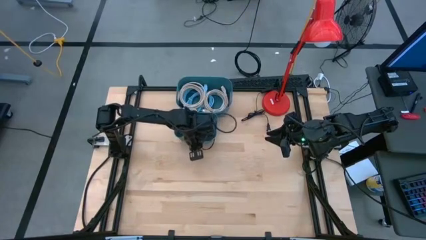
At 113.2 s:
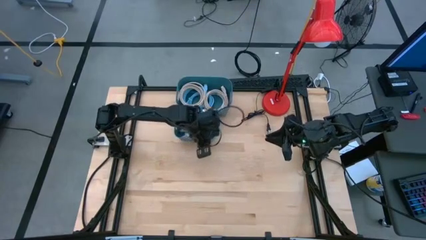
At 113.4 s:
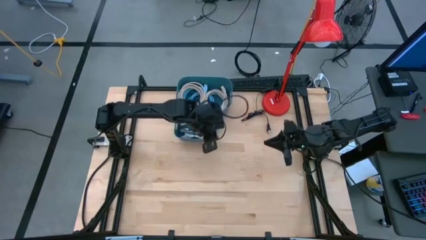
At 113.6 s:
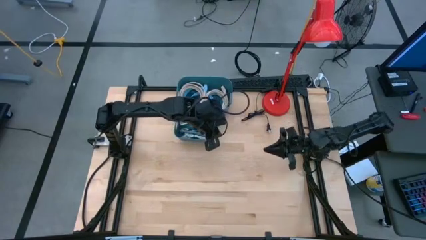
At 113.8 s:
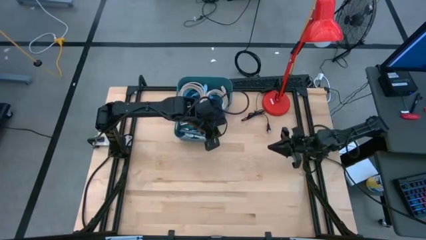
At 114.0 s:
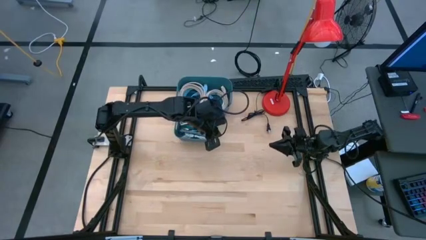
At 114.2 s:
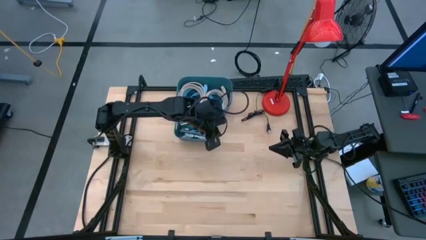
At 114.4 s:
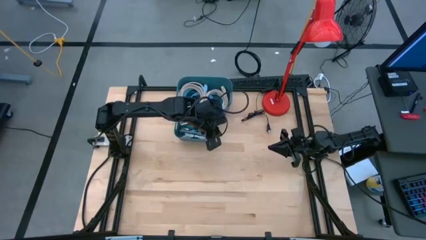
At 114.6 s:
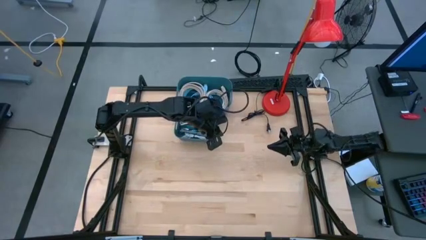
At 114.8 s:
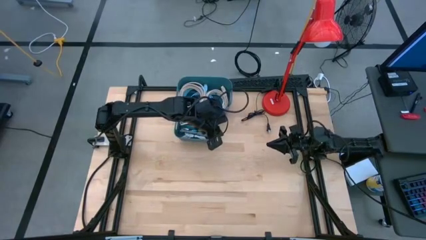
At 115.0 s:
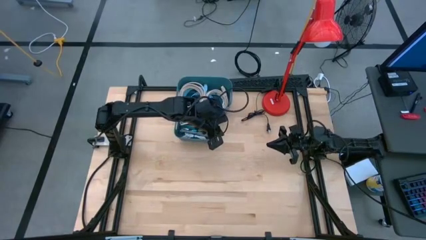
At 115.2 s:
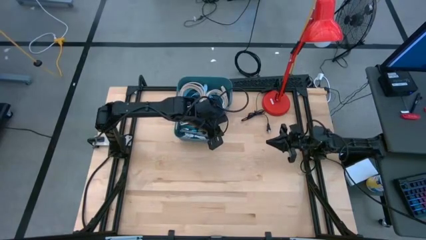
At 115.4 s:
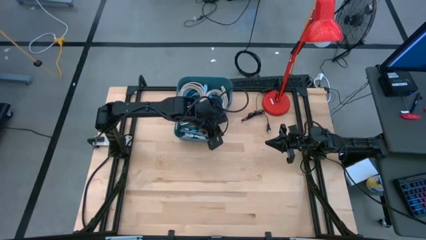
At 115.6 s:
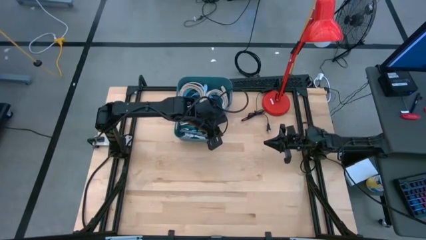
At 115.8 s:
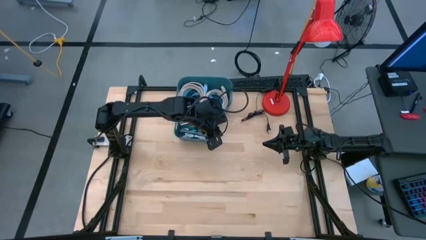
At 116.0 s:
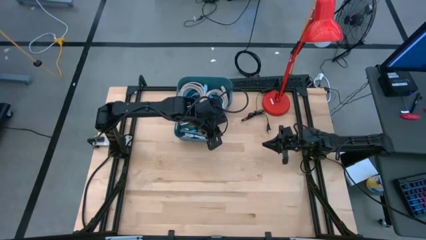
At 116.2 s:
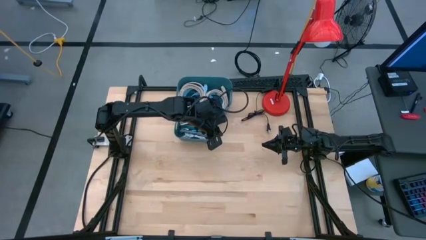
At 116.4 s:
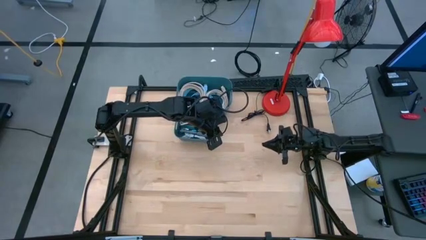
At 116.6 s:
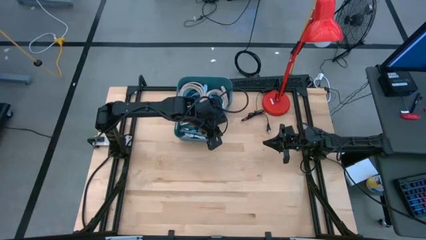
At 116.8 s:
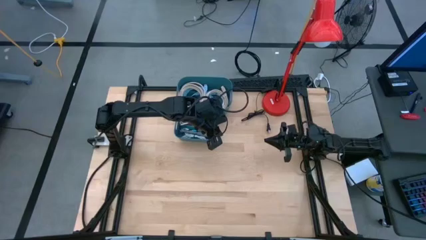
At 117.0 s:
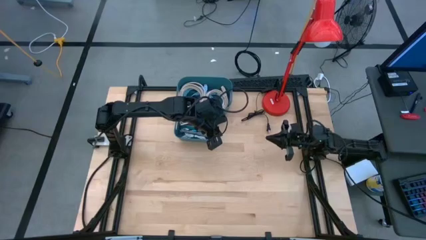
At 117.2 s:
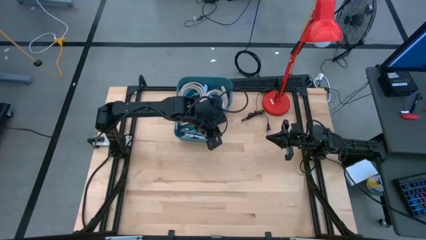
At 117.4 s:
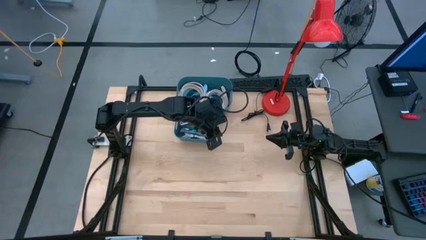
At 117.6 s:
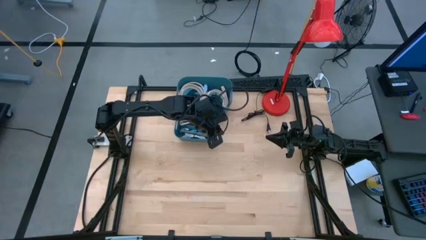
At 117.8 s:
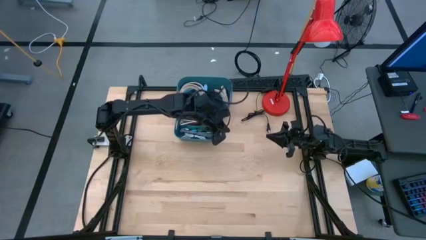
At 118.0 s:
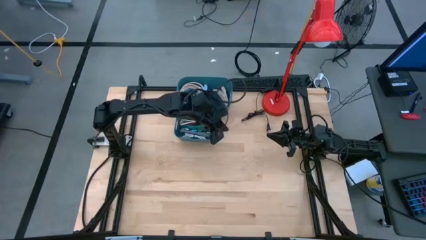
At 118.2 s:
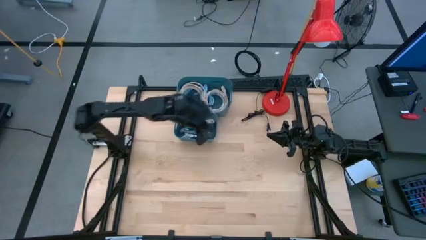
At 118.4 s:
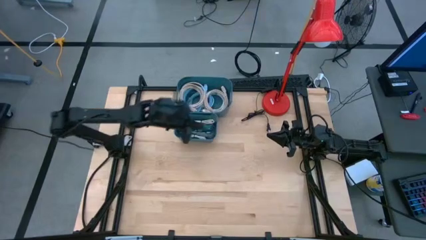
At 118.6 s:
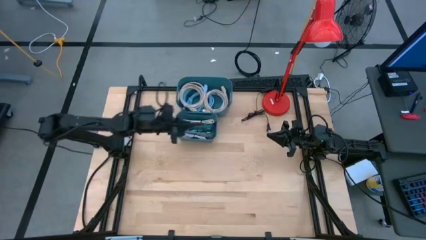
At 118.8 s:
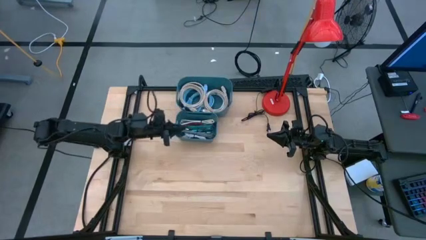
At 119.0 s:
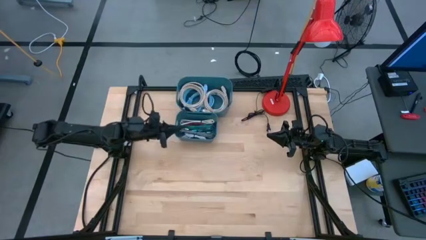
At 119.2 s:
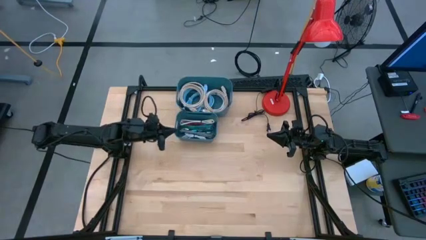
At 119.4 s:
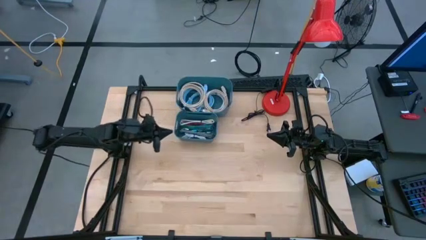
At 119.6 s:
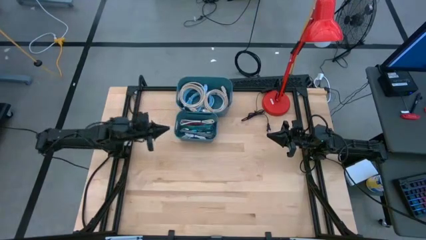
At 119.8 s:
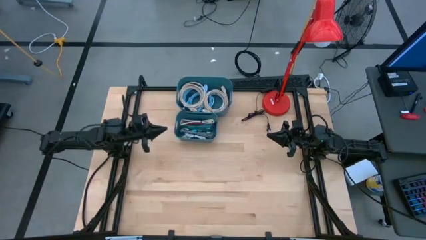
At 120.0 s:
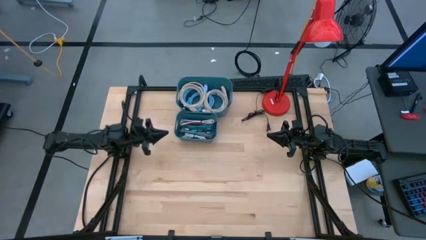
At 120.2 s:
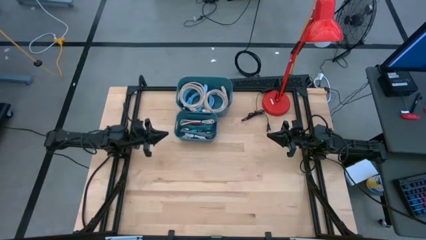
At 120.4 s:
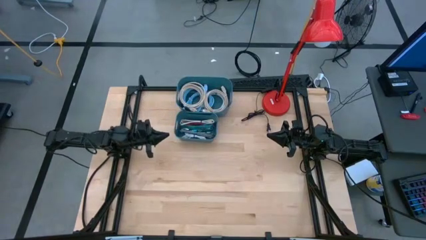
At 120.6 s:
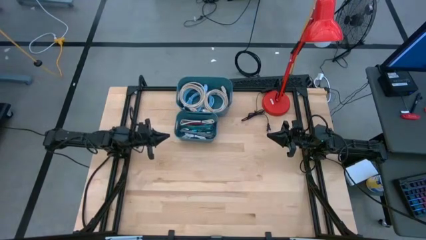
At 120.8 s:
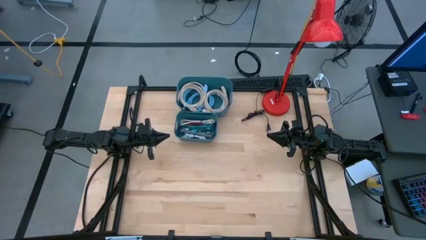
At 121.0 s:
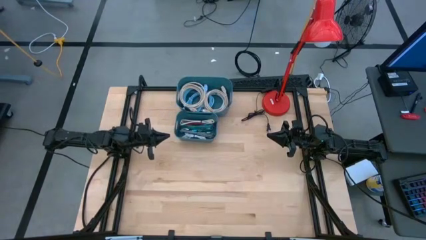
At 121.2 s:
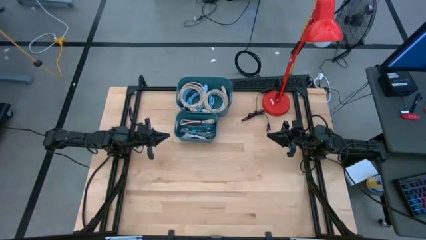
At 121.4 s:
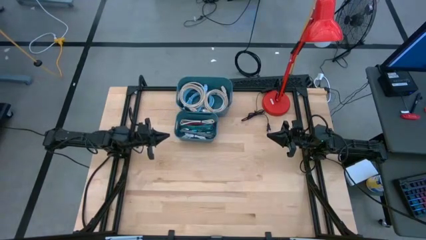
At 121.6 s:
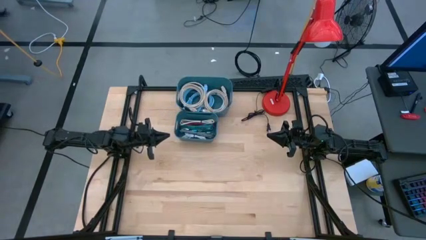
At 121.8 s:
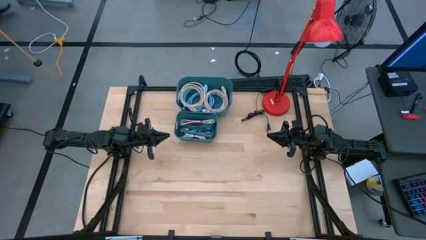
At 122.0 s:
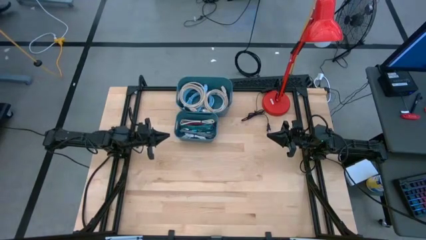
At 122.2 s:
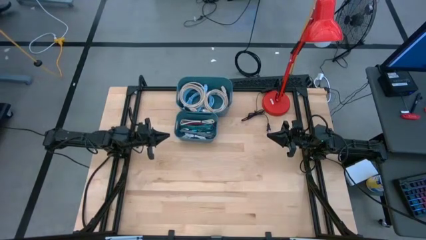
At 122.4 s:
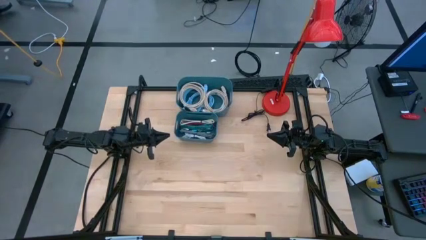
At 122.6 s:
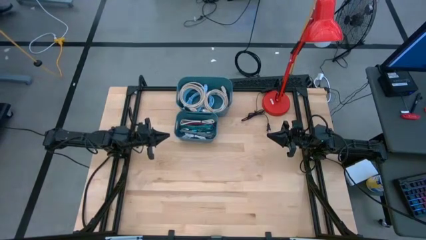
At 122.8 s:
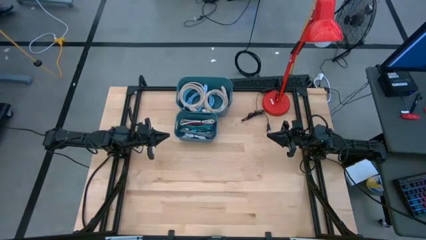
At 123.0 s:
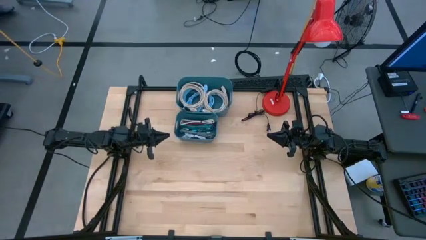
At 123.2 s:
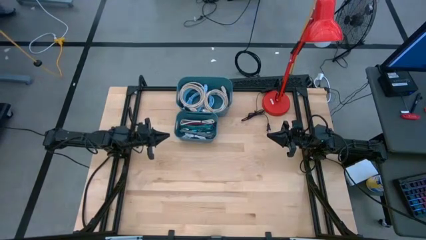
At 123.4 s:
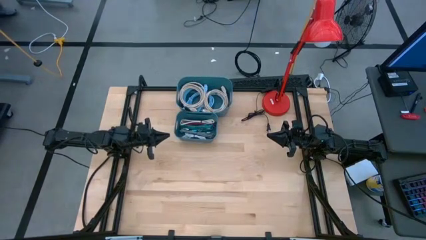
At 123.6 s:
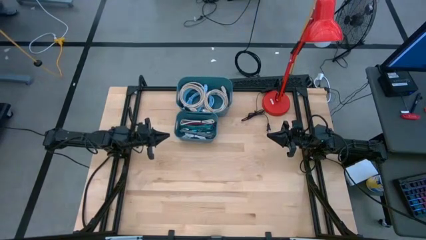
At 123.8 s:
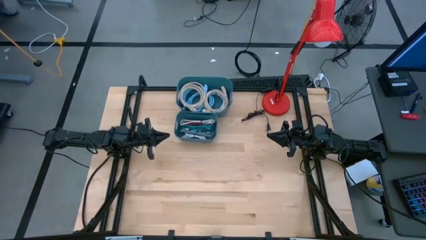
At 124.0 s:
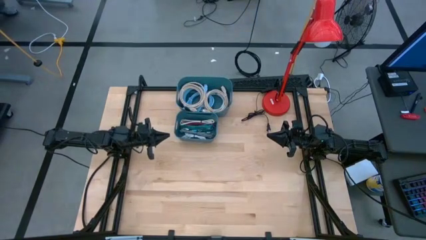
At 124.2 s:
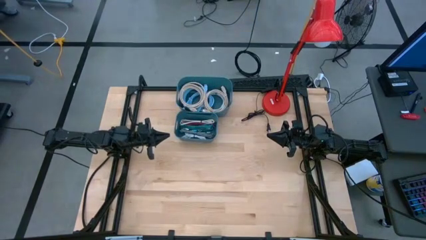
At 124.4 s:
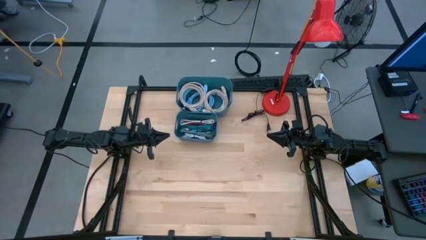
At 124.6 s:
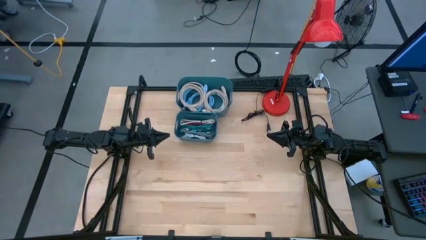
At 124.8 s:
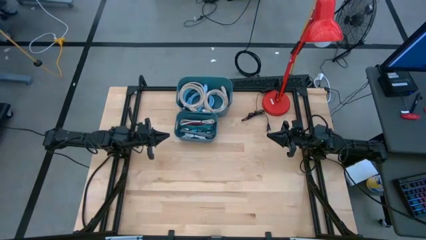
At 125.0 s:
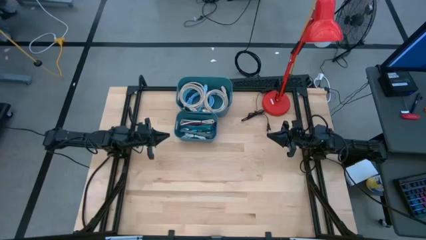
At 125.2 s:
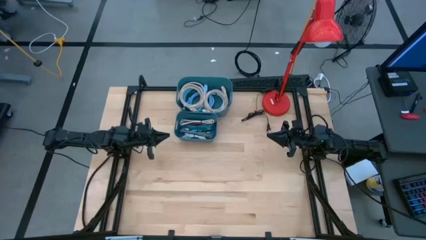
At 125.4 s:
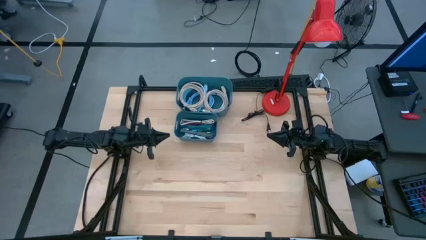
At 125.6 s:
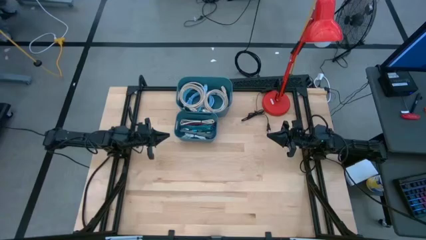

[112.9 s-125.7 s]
Task: Pick & Place USB Port
Return to Home Position

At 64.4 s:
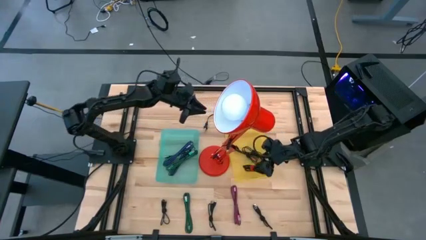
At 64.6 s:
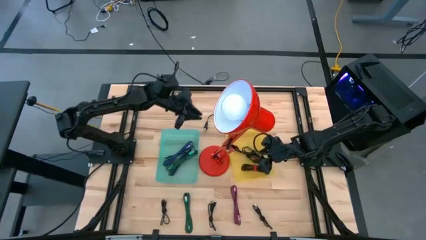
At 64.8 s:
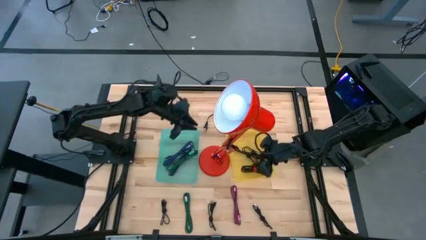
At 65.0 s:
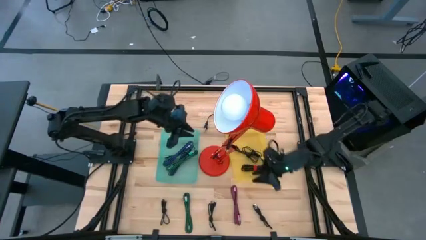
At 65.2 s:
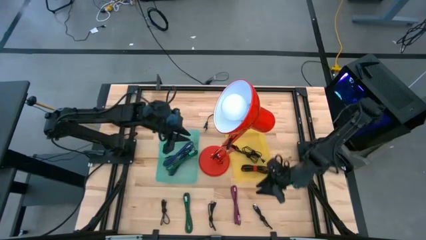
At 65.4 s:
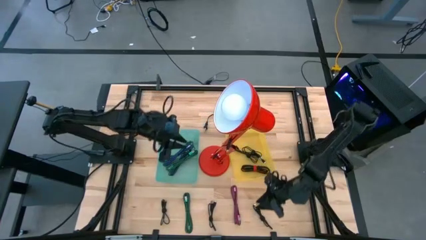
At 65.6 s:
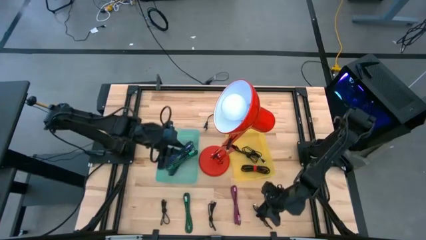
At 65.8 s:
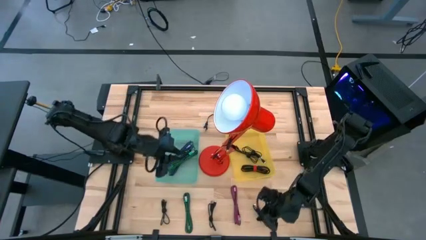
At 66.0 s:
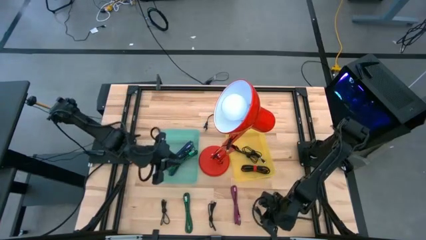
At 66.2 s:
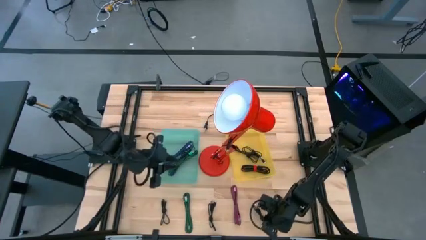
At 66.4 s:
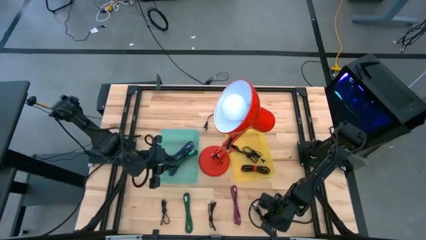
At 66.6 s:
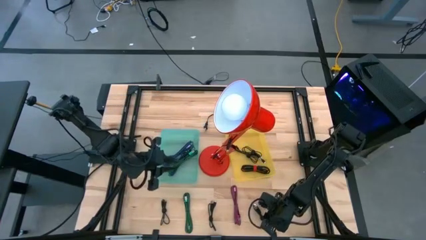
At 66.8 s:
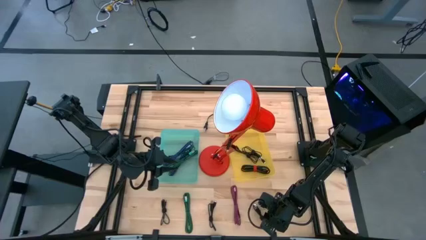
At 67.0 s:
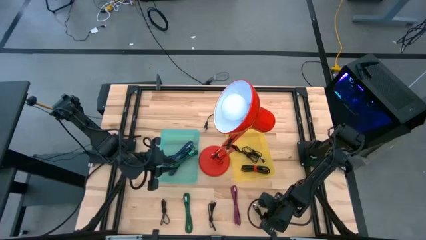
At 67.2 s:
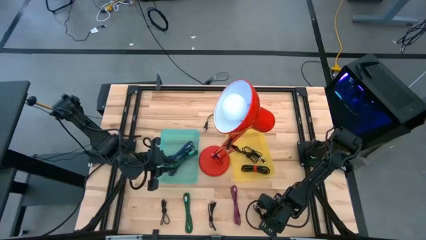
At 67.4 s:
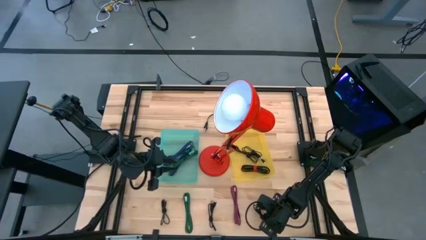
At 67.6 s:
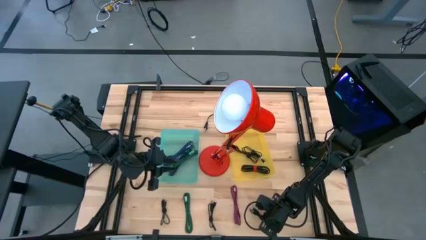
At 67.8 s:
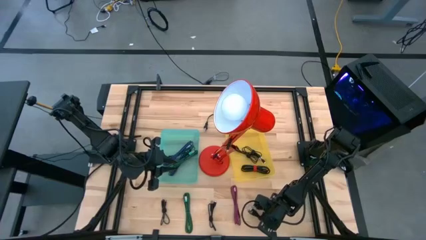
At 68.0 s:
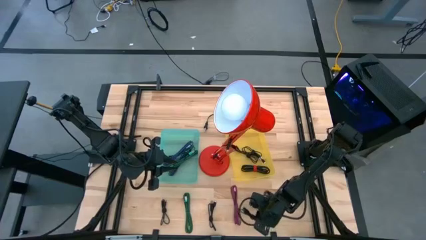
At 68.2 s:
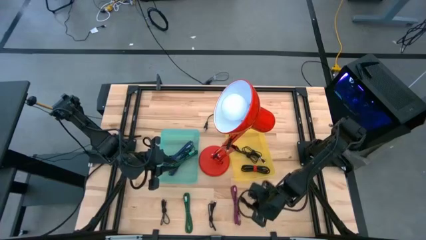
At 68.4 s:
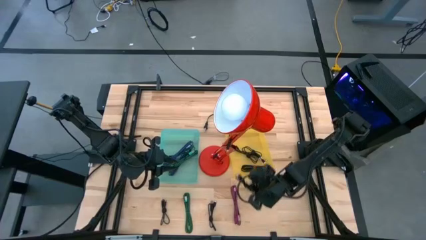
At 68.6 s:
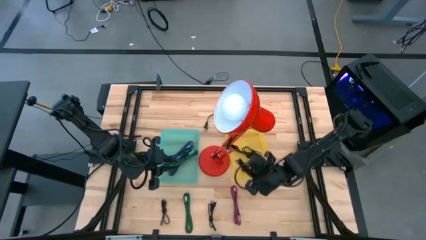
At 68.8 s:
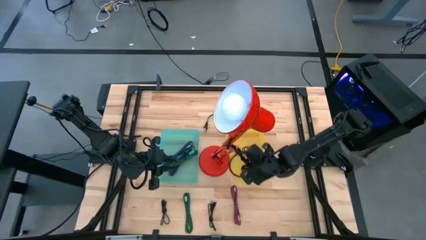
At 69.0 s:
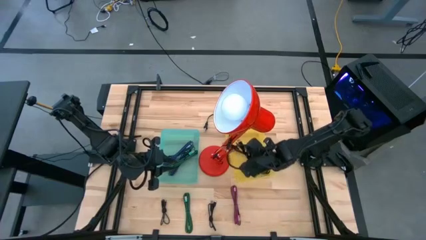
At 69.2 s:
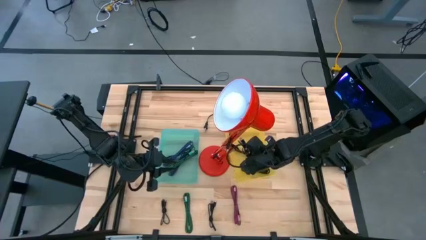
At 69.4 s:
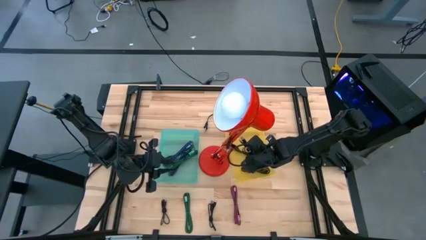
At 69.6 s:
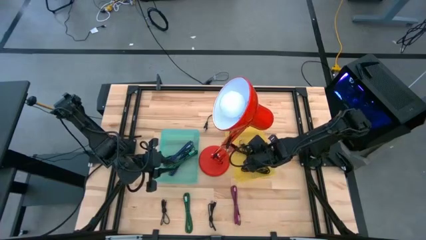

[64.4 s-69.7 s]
Task: Pick & Place USB Port
Put the black charger cable into the yellow bin
